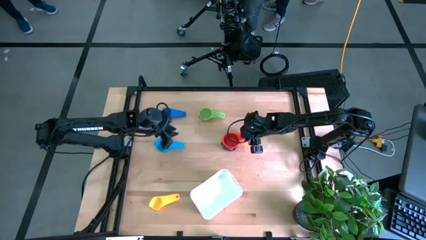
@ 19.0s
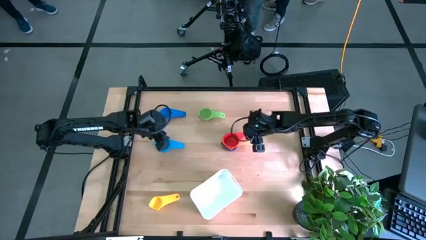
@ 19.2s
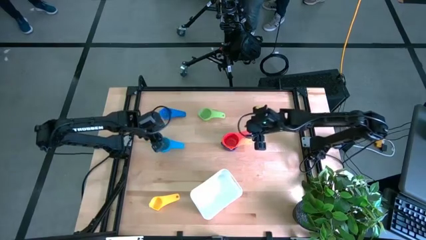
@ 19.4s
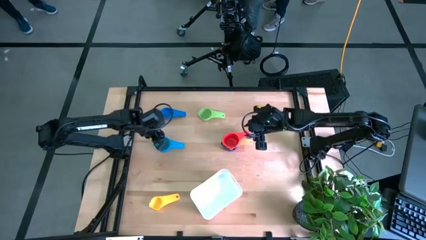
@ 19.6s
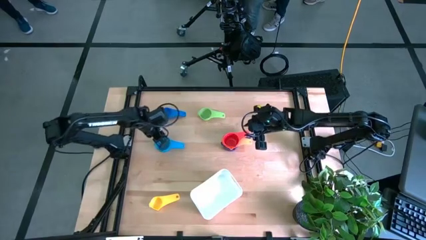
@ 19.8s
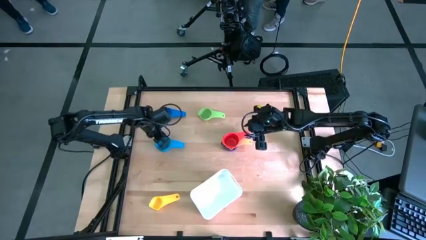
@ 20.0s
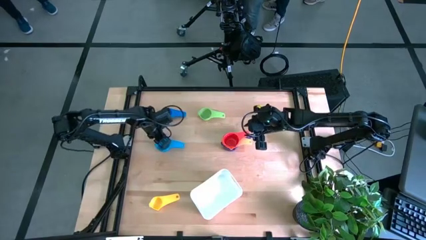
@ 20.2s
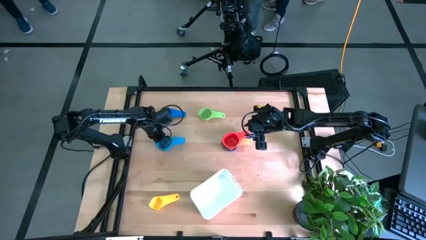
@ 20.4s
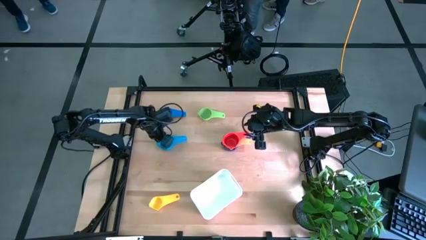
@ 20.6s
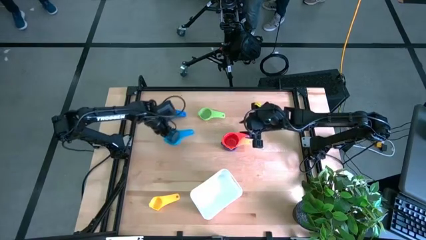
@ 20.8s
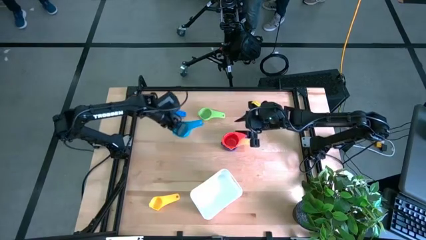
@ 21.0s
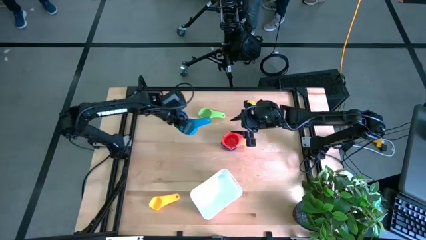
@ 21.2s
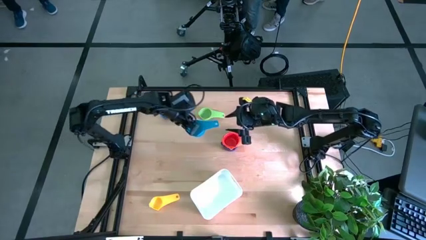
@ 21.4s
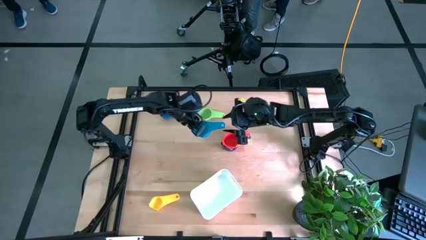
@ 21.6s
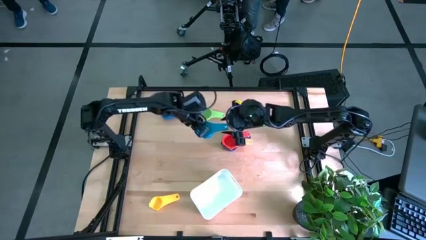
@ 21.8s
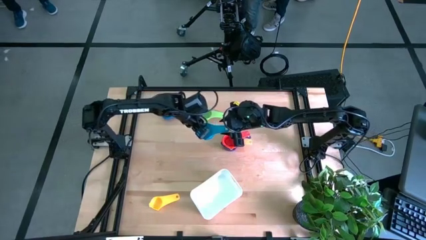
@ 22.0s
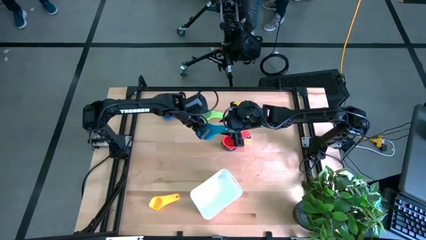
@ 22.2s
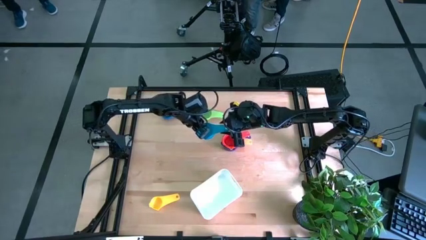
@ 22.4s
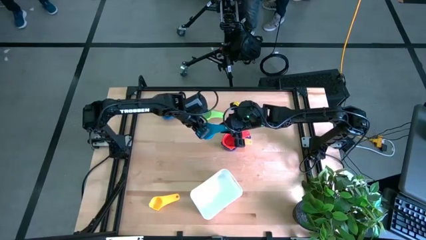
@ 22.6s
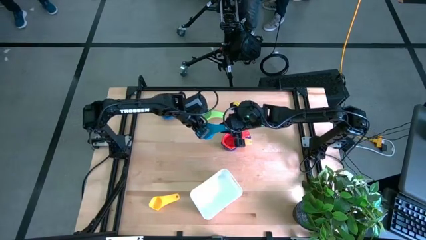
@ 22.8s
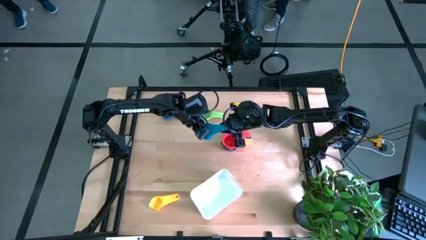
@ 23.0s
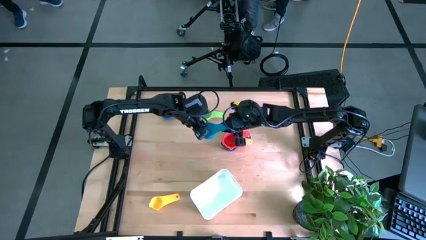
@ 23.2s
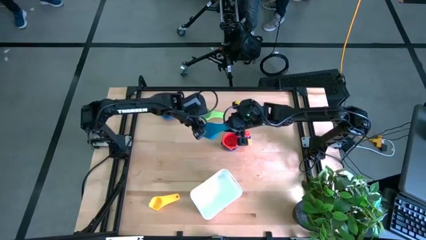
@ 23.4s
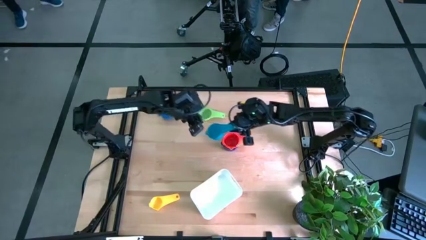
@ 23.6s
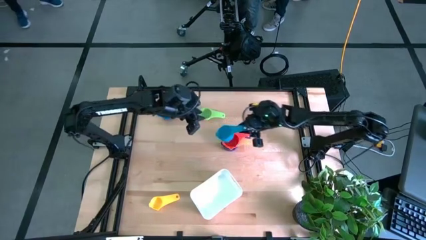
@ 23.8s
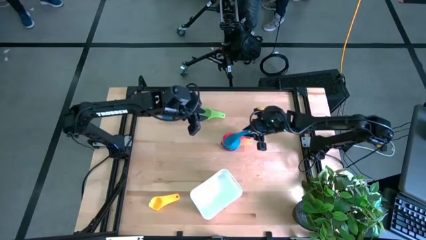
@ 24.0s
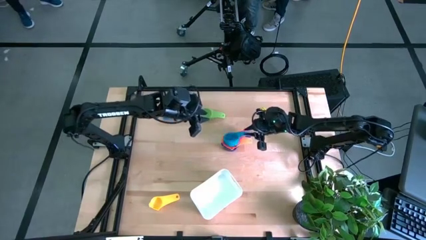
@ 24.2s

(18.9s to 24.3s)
Task: Nest measuring cups in basket
Stack the light blue measuring cup on top of the red measuring cup

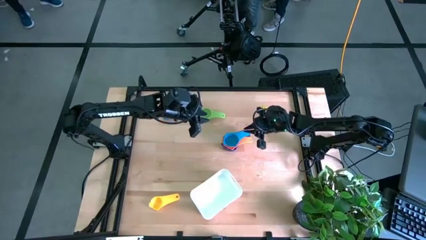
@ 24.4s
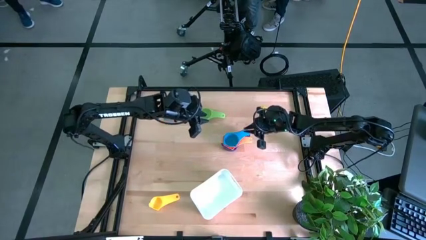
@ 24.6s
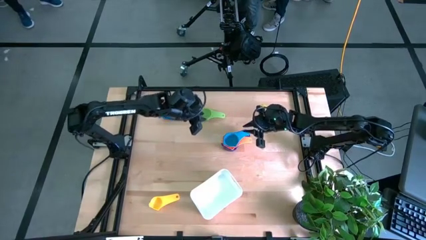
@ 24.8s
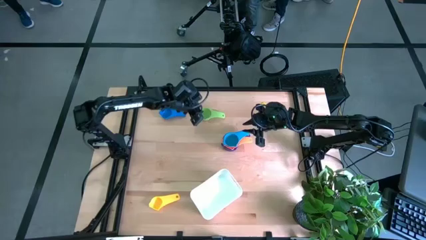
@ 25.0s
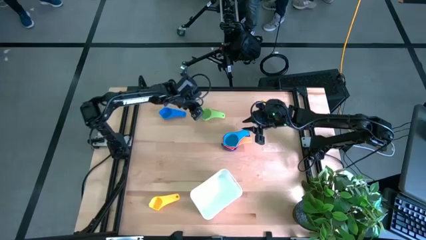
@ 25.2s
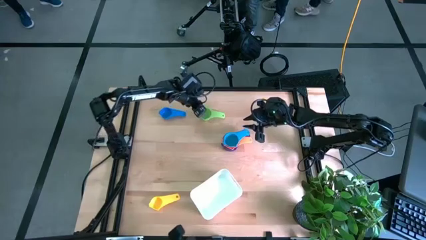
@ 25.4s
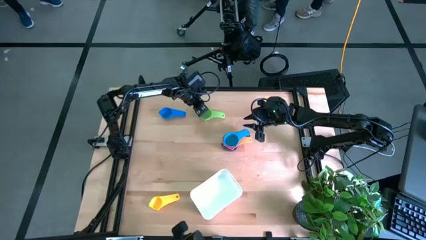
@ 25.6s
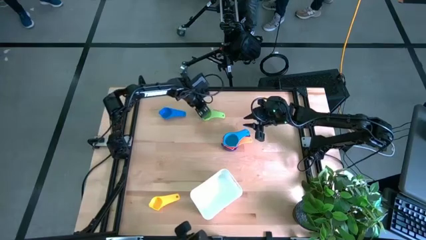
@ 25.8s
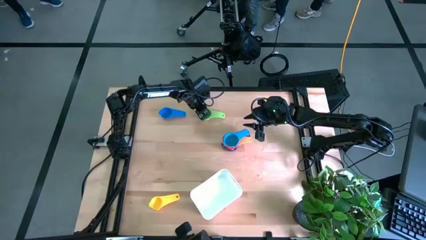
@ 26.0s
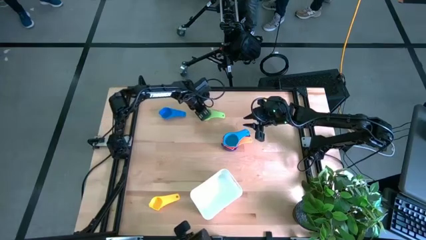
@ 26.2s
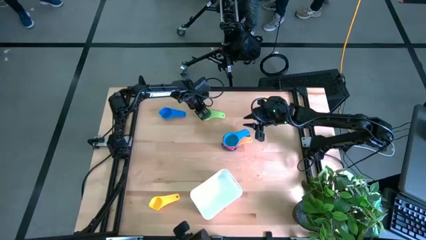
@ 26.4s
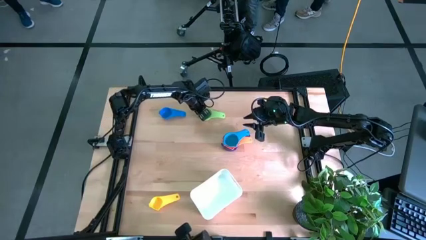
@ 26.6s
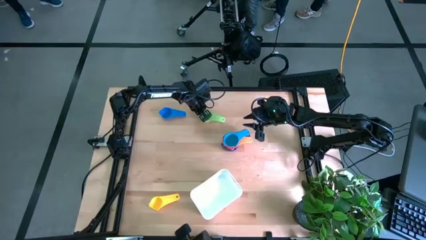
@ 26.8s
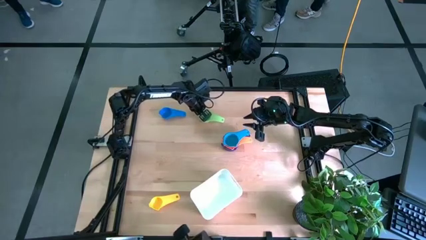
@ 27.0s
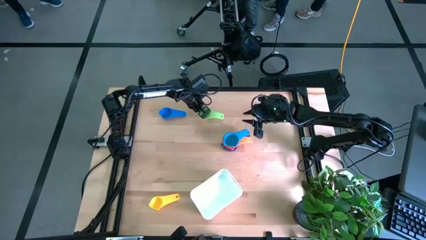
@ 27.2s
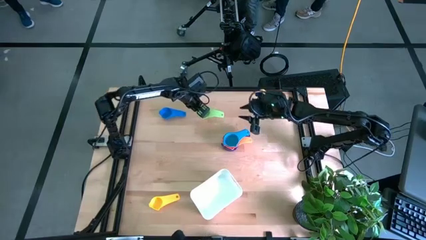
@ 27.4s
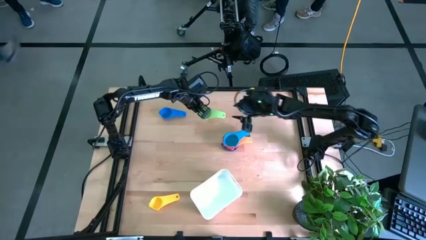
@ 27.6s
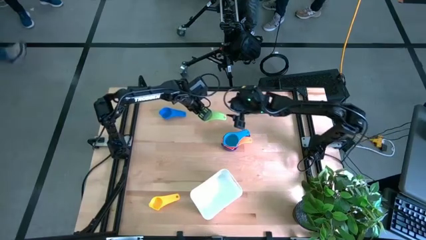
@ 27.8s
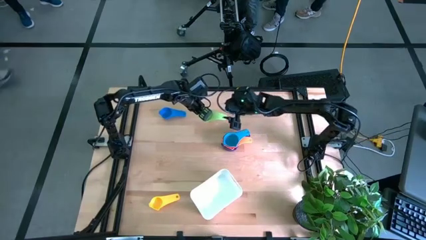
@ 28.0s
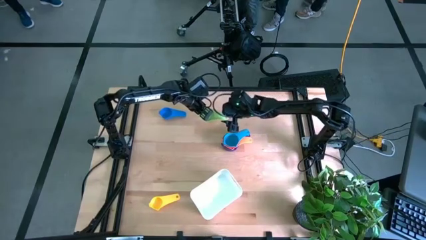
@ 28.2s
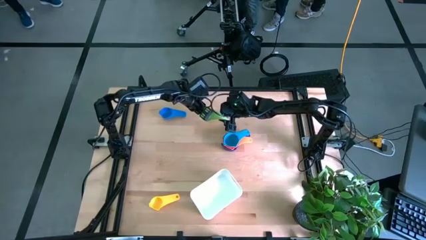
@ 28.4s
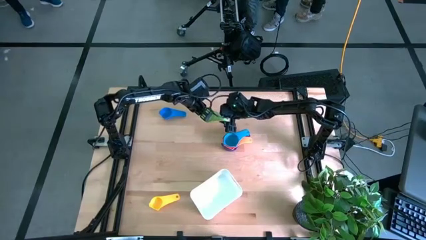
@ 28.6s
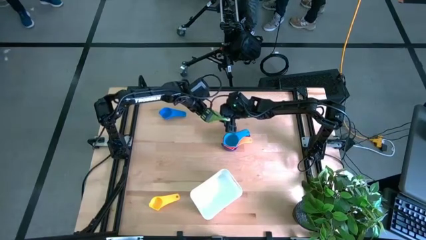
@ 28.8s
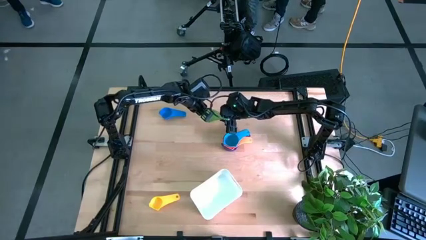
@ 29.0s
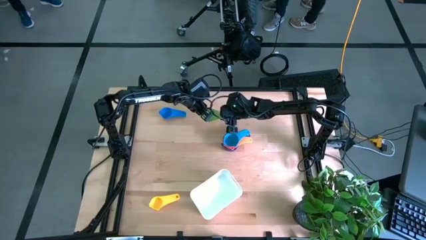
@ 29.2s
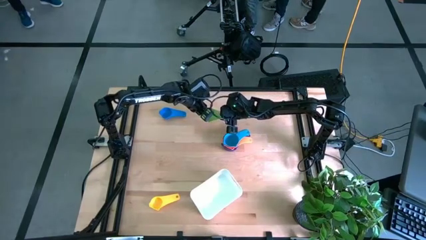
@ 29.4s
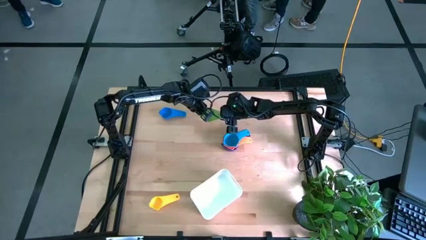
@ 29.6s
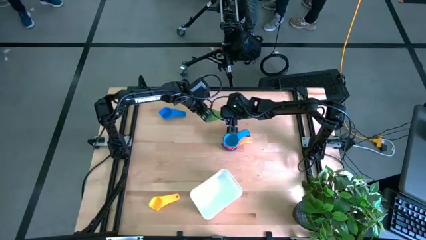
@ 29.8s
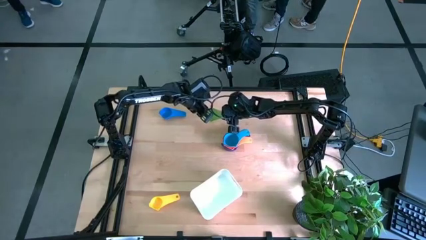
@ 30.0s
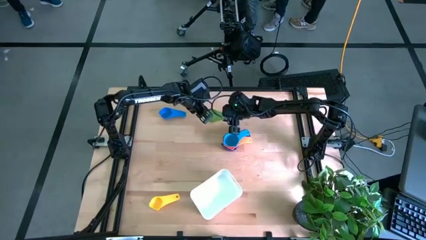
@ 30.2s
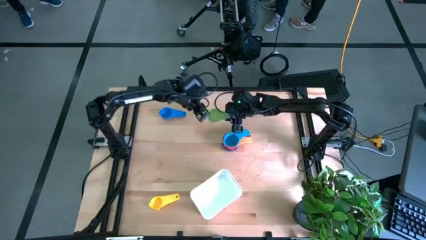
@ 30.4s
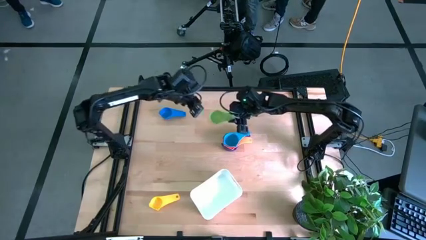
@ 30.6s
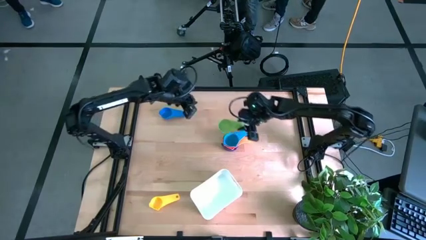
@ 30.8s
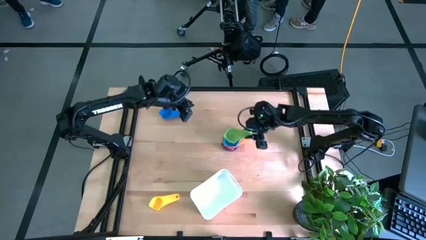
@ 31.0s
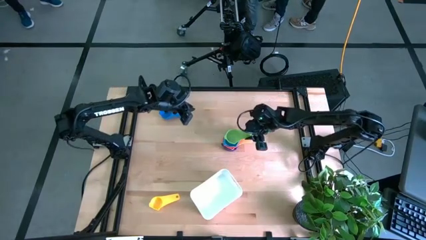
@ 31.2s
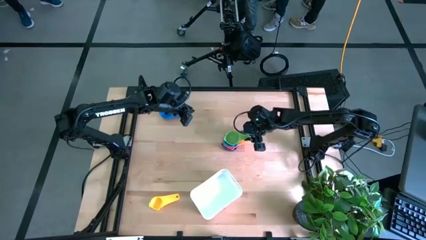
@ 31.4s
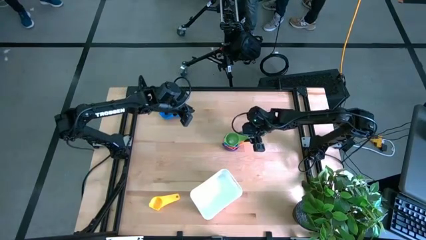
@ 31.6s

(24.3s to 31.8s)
Stack the green measuring cup on top of the light blue measuring cup

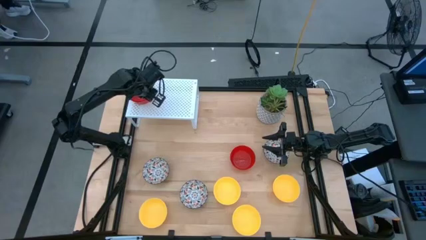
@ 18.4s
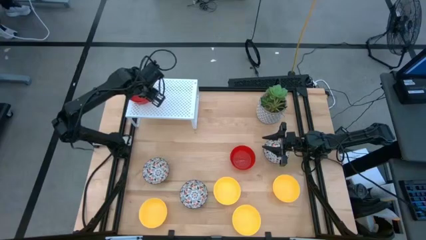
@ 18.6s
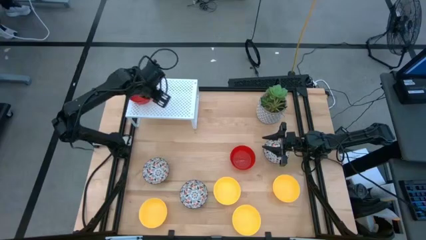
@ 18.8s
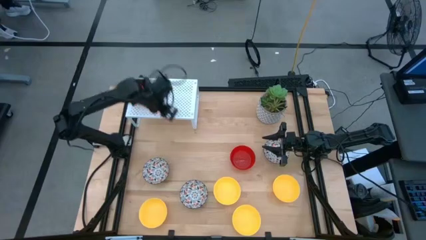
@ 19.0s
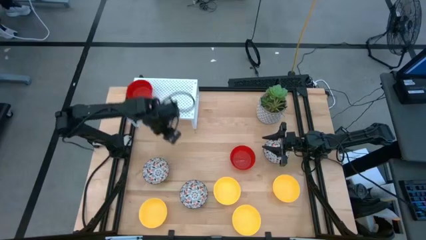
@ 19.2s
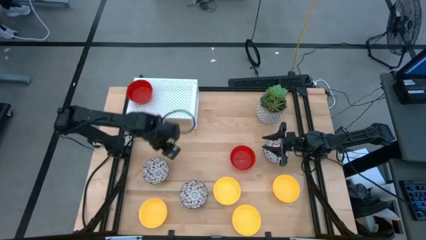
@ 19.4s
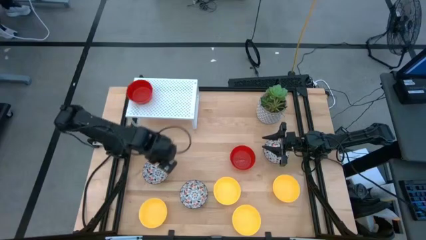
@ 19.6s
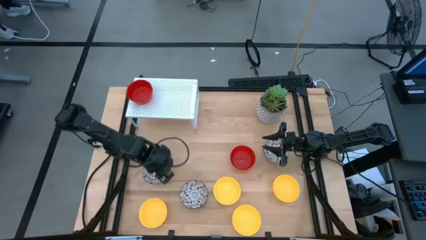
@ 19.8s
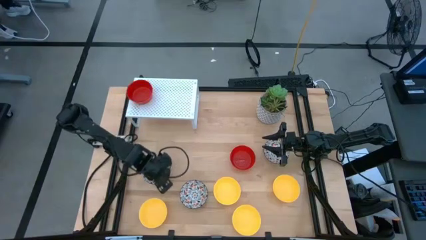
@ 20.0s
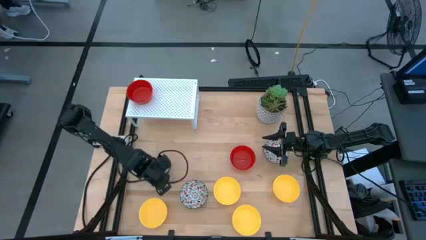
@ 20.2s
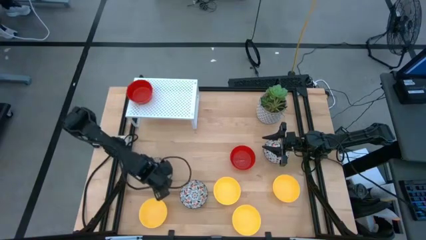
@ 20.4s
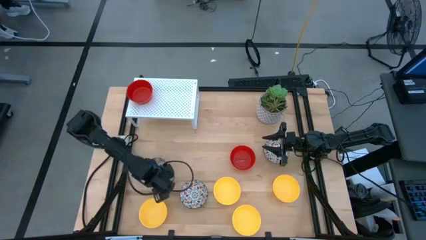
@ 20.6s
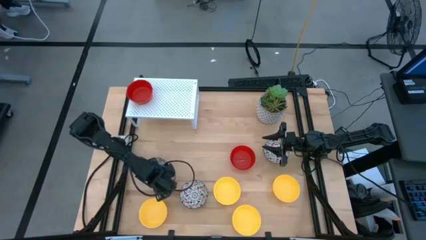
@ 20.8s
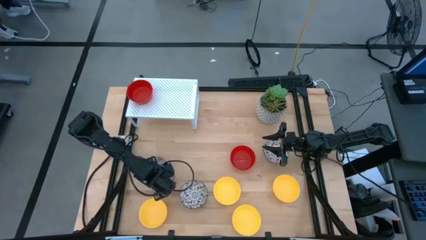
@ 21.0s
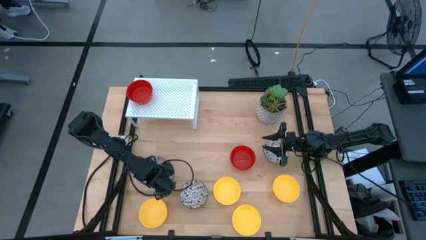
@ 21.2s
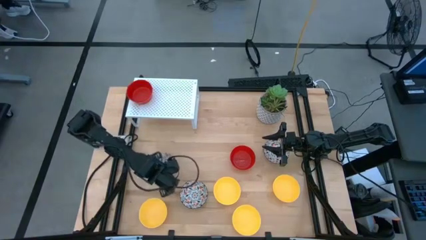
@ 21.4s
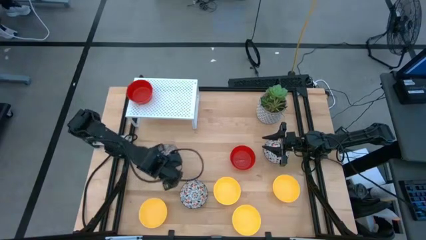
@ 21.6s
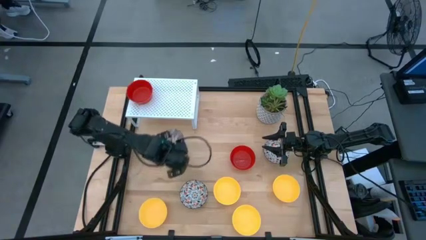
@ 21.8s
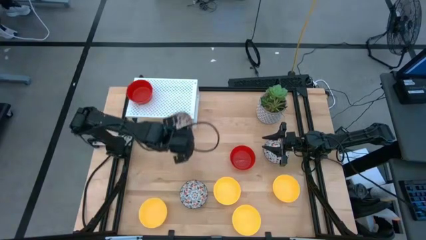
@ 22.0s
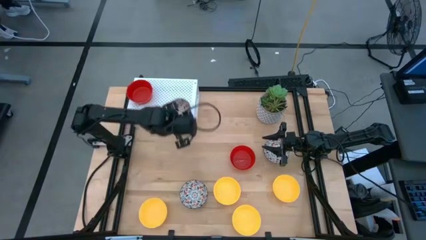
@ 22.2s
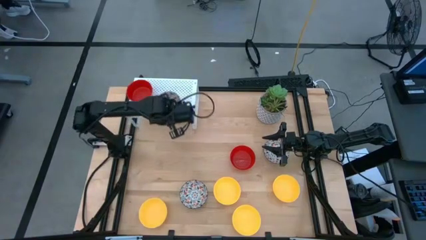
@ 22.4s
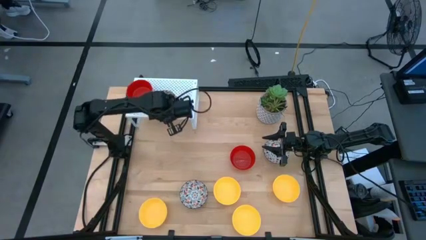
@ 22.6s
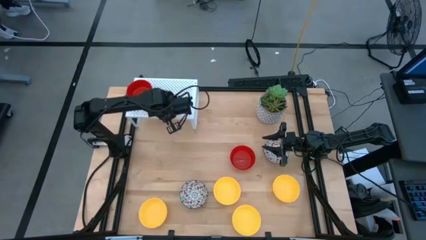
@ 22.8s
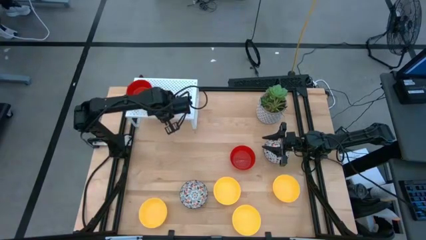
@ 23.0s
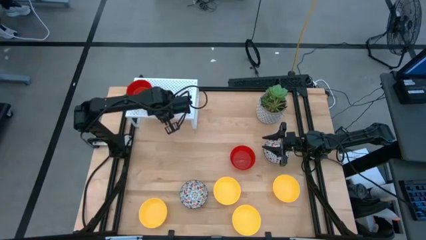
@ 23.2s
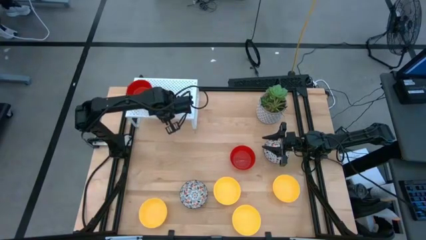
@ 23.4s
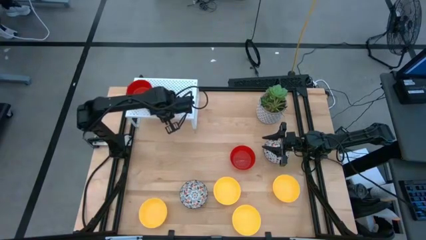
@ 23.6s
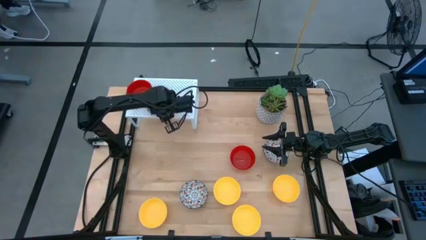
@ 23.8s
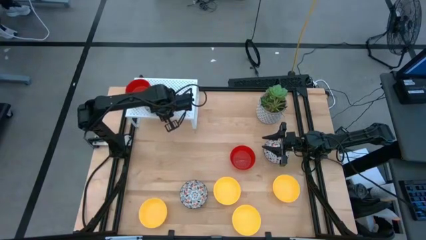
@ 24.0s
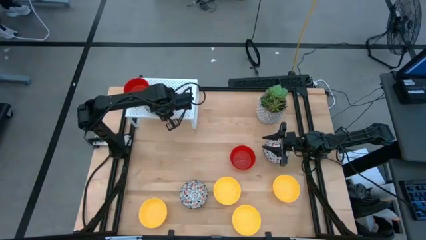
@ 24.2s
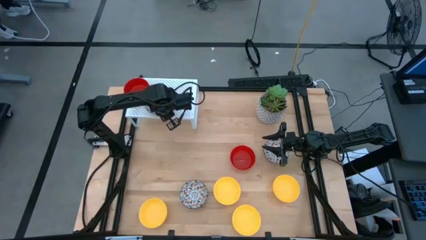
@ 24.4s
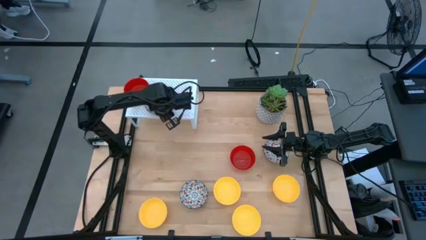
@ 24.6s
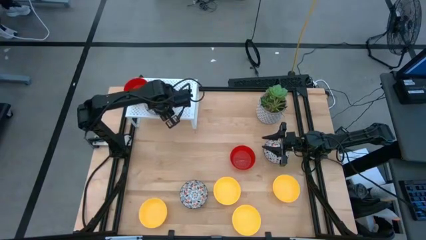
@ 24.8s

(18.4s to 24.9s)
Task: Pick & Place Mini bowls
Put the black bowl on the shelf
